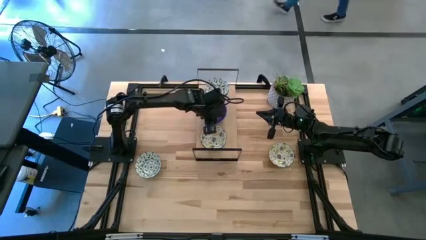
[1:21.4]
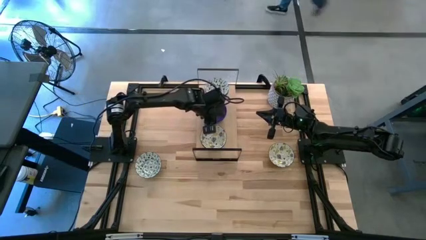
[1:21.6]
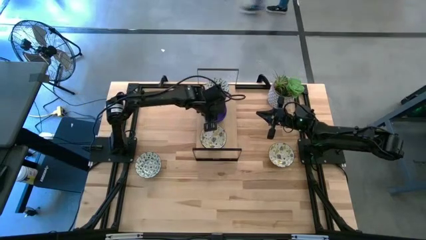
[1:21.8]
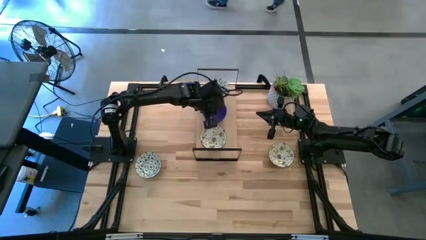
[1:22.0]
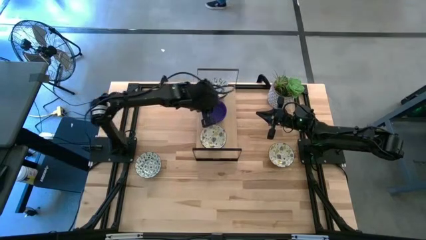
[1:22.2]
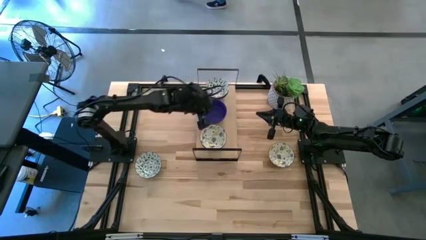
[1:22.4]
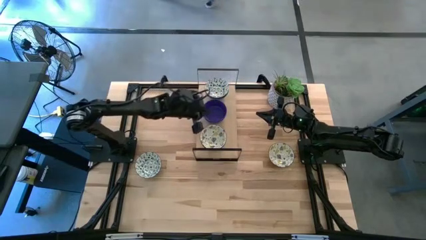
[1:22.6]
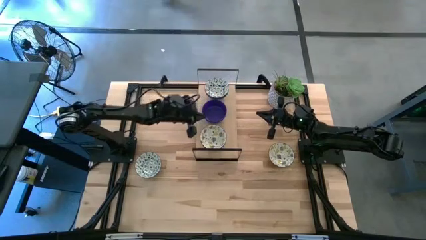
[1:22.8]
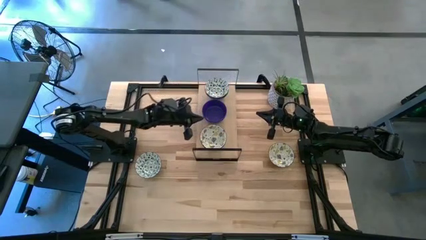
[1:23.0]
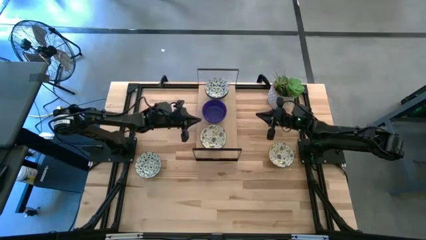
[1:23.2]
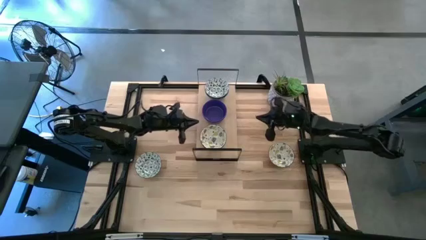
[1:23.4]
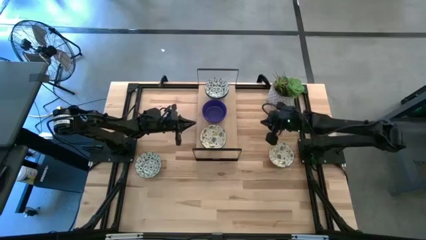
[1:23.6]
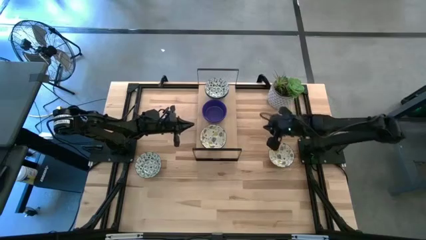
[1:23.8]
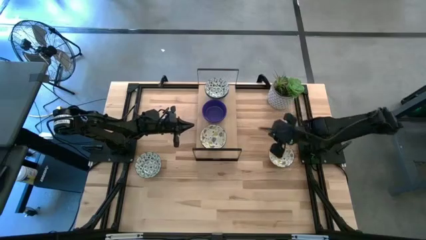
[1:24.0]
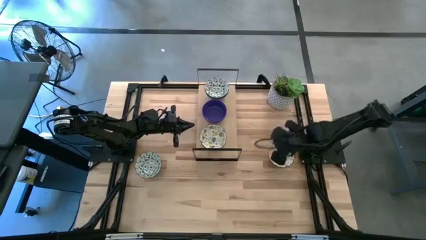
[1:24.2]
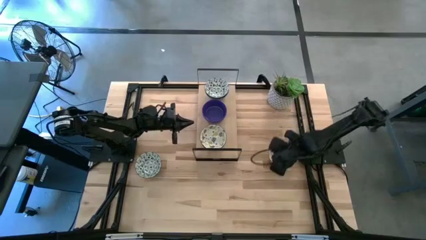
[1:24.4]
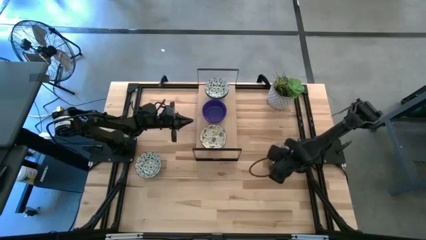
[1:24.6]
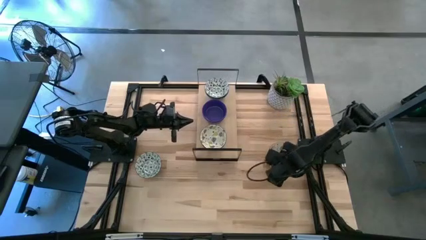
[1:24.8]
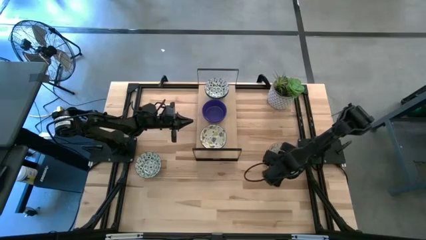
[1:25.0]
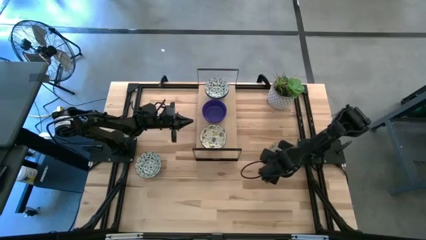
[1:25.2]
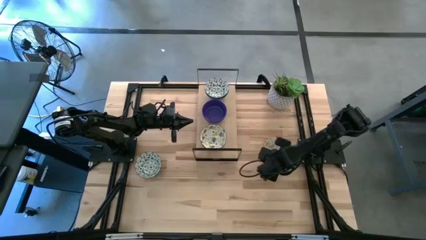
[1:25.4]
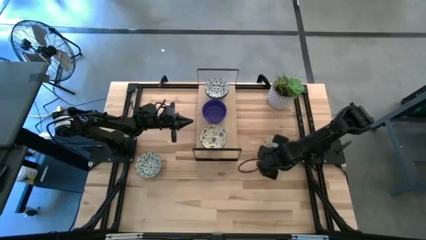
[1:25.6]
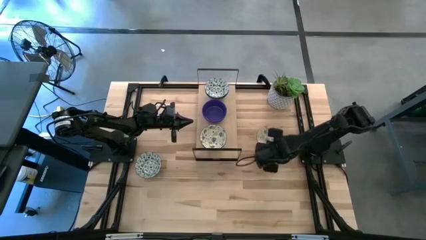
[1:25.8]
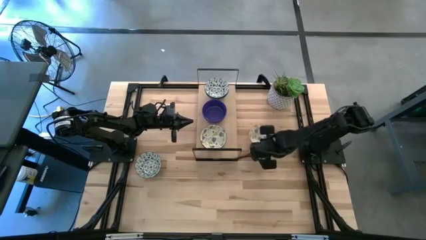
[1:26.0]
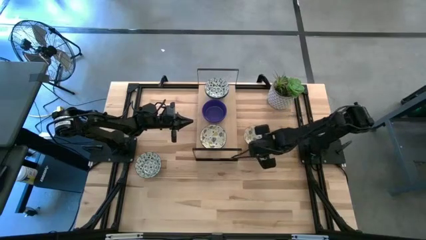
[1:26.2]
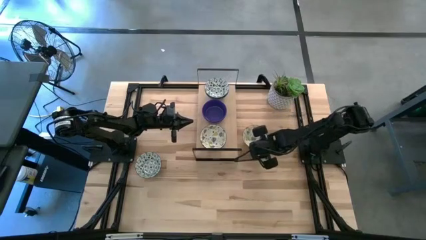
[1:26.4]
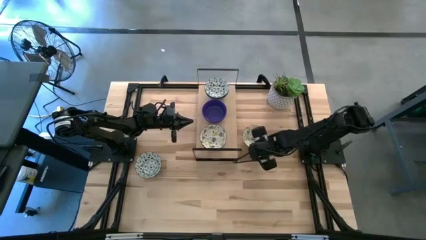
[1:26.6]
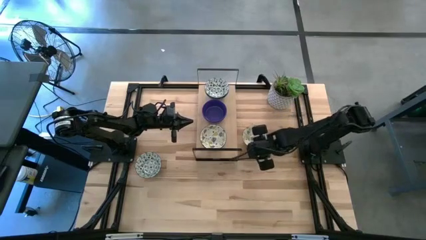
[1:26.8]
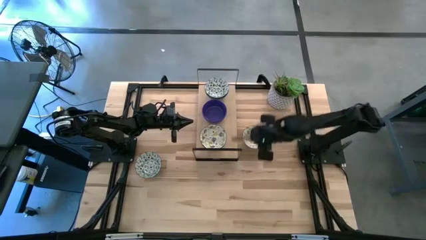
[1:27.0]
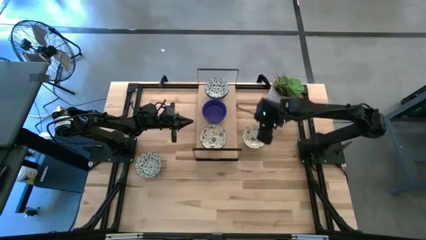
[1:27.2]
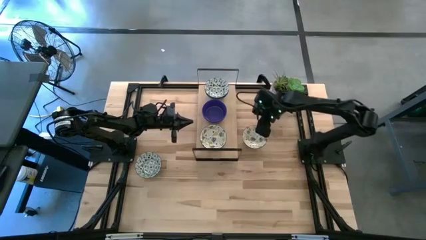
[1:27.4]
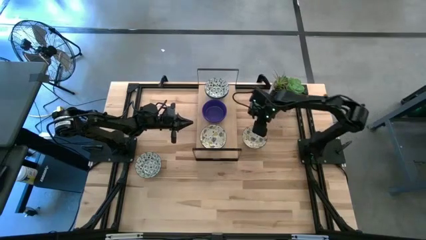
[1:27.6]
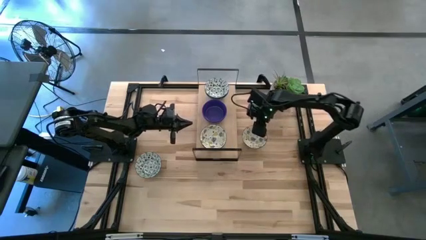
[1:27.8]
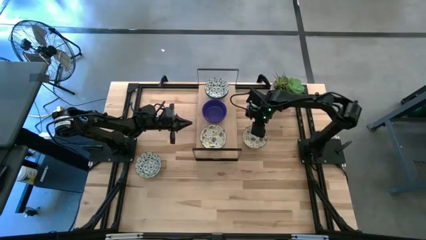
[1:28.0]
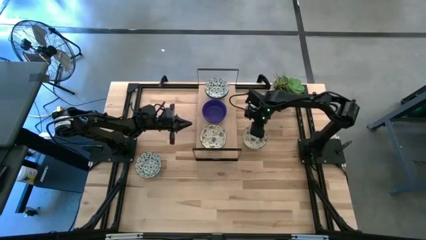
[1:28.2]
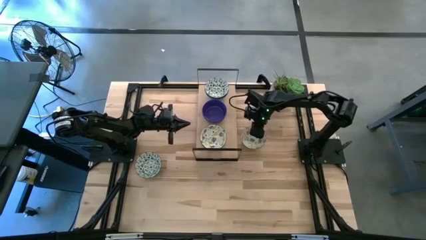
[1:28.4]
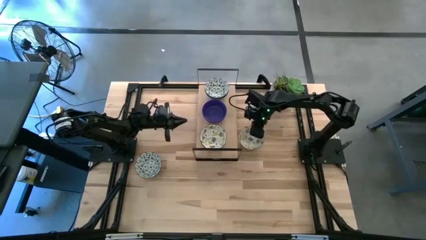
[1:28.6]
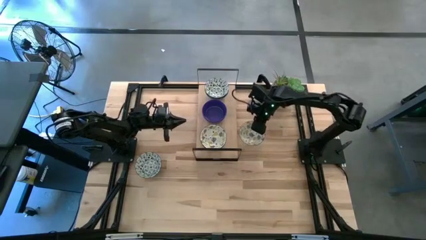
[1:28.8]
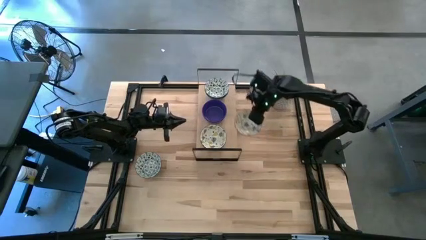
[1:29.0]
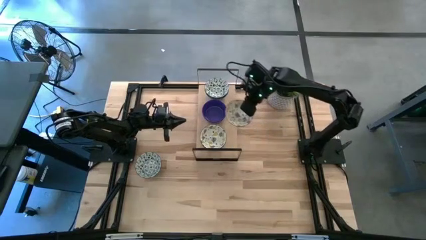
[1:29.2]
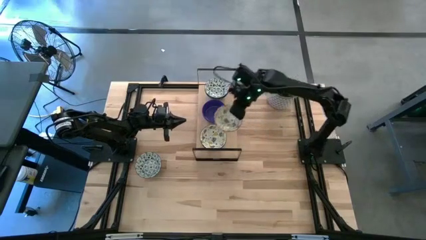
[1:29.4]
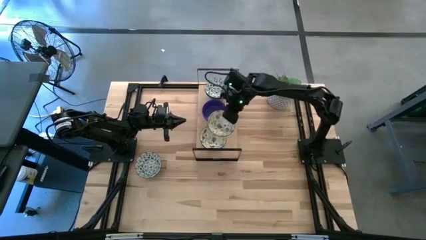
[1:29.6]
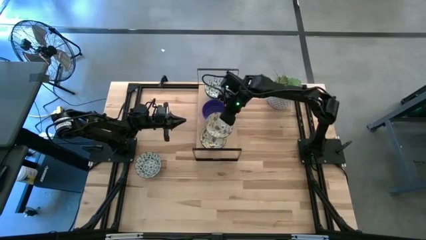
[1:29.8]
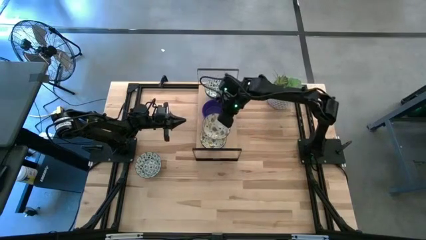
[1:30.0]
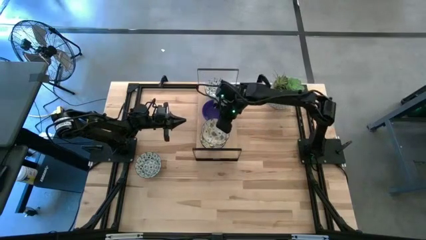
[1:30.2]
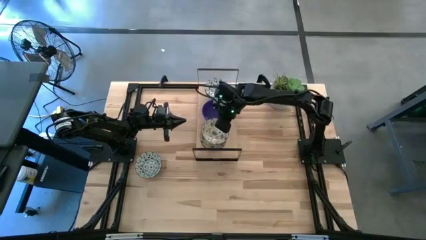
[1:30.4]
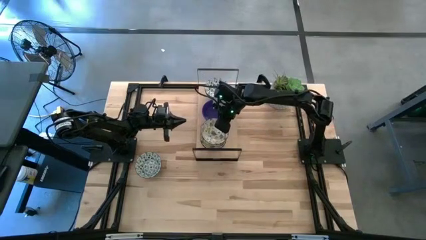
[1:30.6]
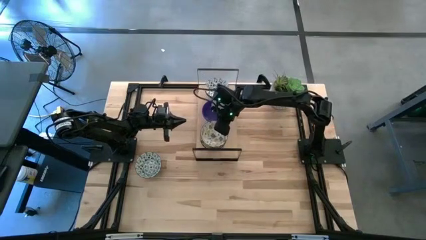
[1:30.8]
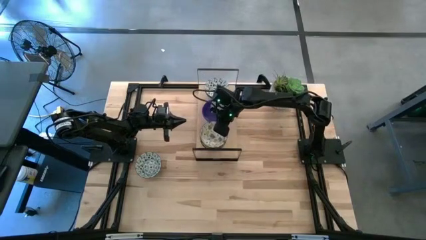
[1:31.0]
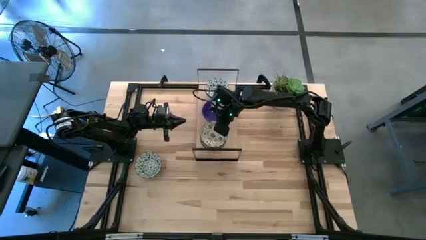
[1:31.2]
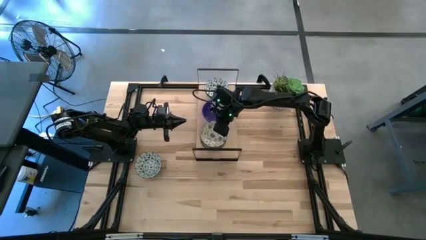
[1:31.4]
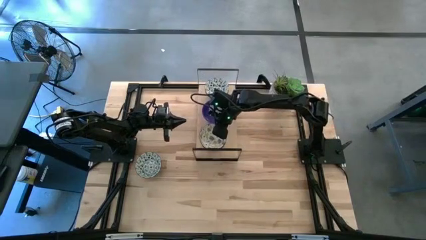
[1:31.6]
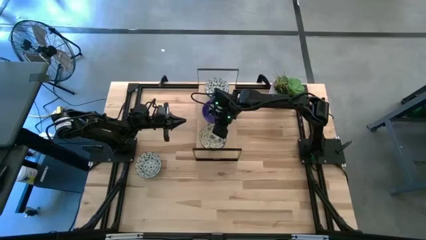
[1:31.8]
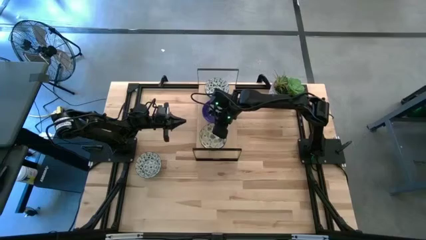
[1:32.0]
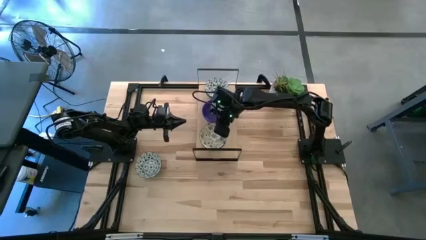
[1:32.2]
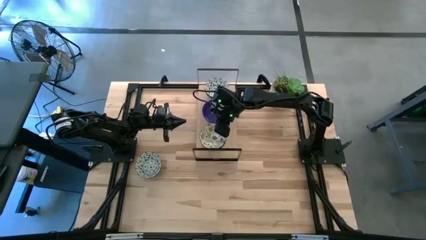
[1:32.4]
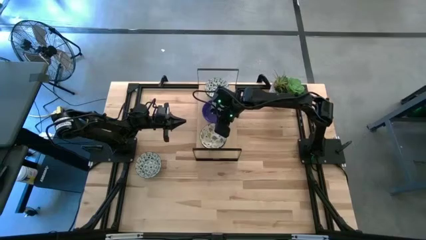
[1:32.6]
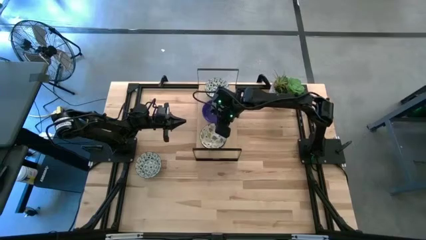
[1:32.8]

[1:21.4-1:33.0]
Task: Pick & Place Mini bowls
Stack the yellow patterned bowl on top of the stacked yellow patterned bowl on the shelf
